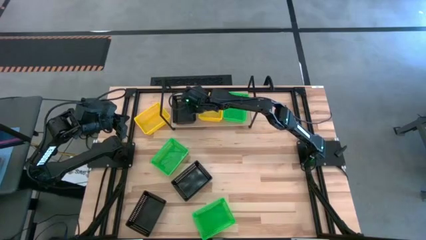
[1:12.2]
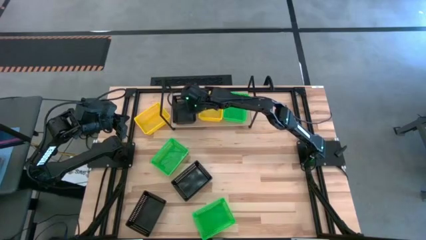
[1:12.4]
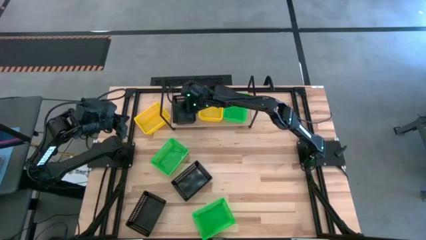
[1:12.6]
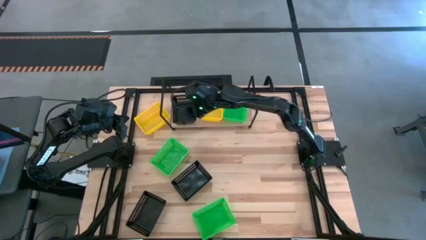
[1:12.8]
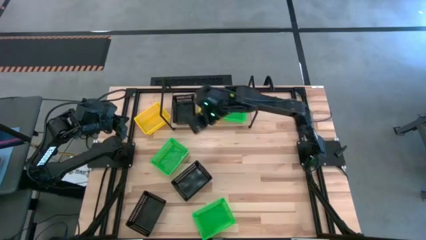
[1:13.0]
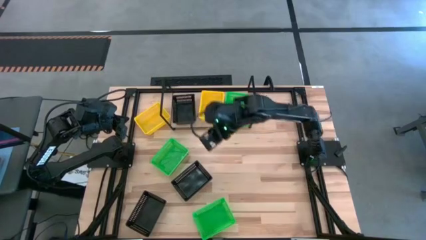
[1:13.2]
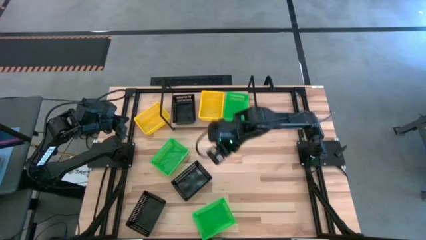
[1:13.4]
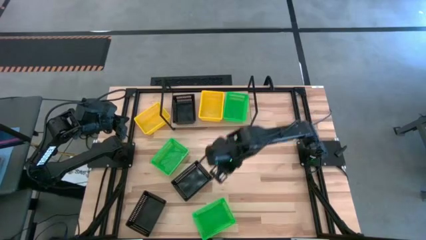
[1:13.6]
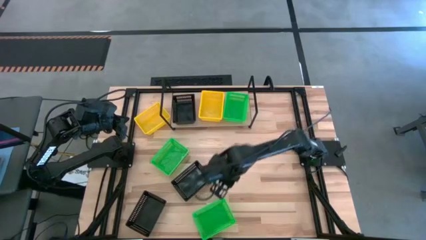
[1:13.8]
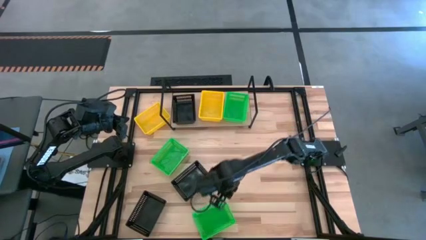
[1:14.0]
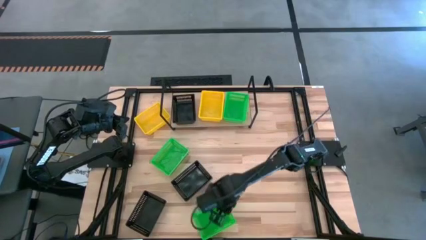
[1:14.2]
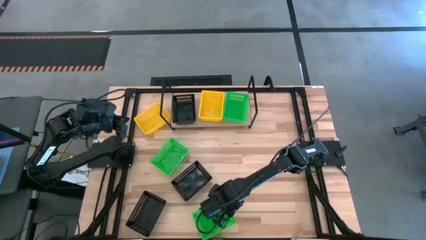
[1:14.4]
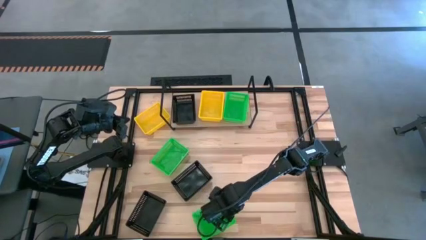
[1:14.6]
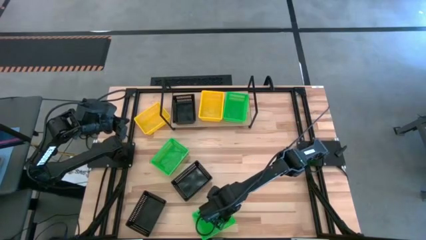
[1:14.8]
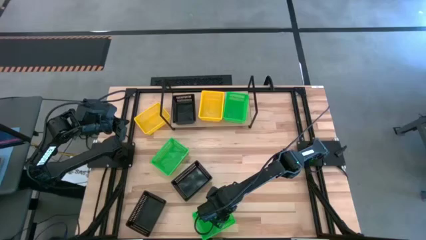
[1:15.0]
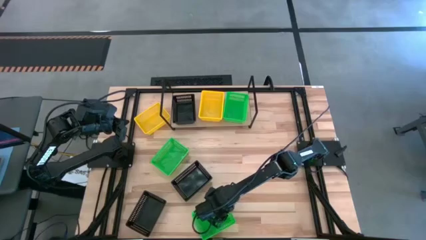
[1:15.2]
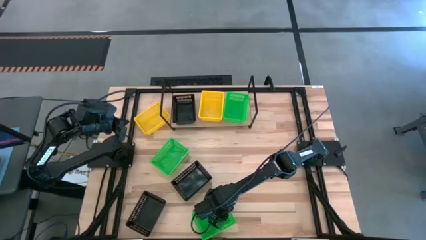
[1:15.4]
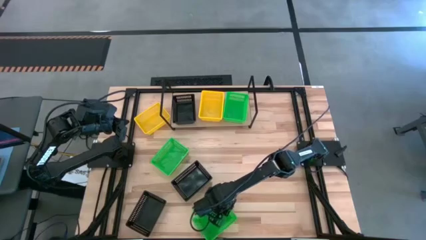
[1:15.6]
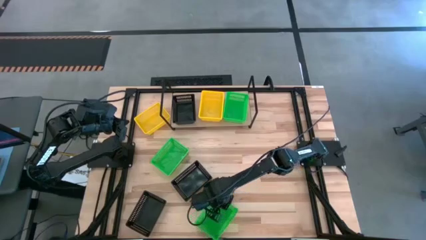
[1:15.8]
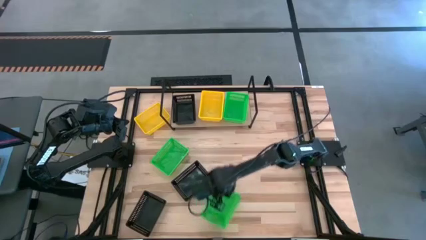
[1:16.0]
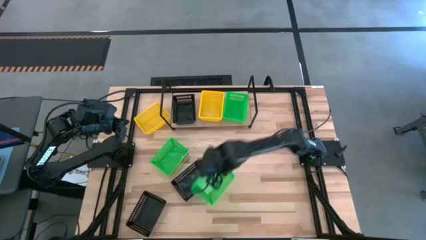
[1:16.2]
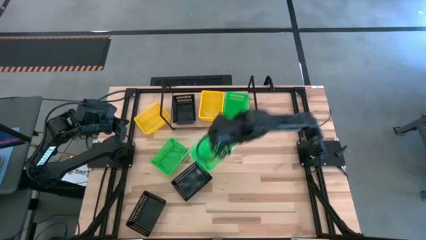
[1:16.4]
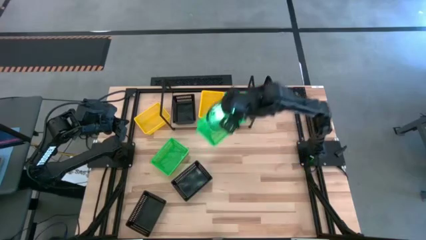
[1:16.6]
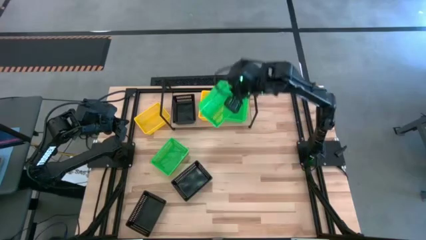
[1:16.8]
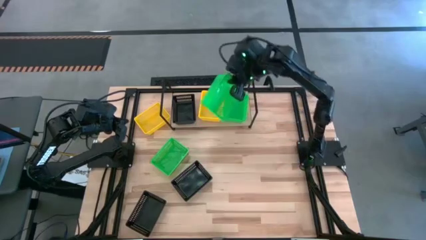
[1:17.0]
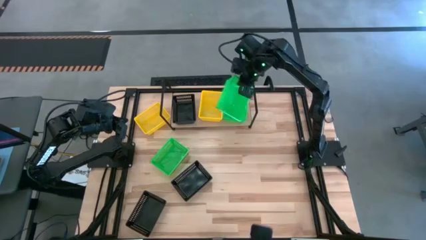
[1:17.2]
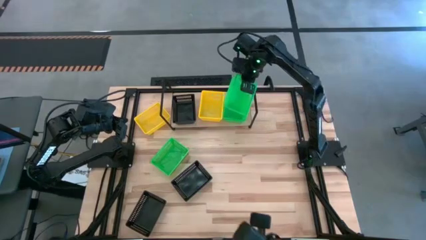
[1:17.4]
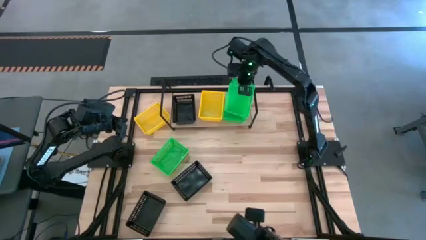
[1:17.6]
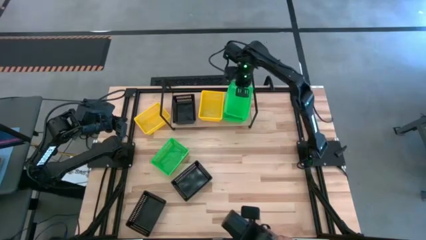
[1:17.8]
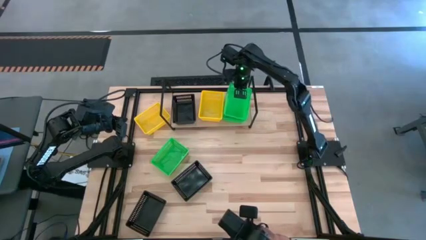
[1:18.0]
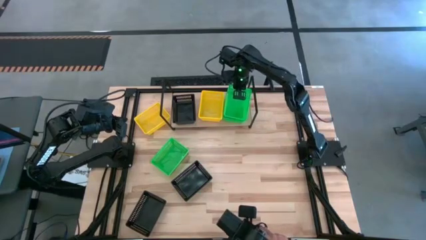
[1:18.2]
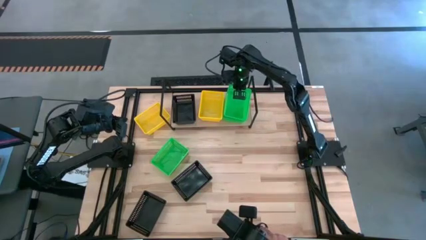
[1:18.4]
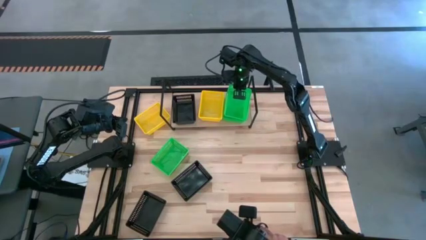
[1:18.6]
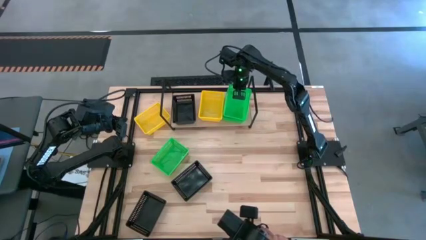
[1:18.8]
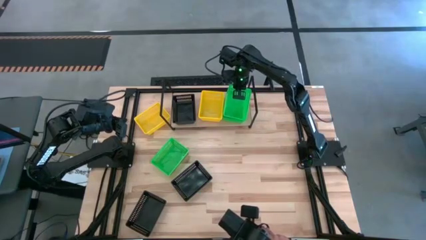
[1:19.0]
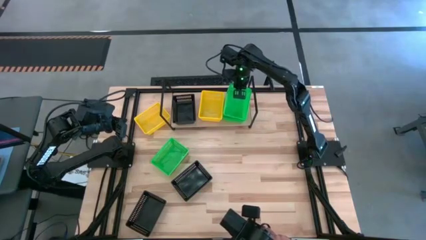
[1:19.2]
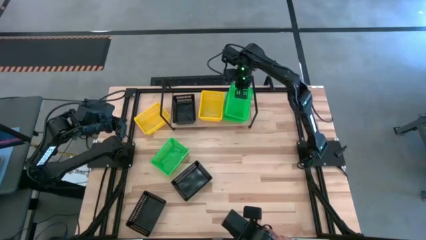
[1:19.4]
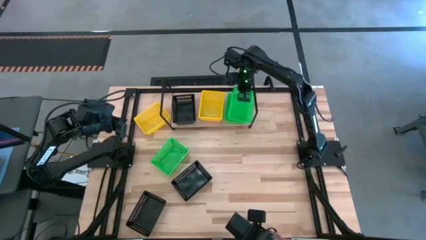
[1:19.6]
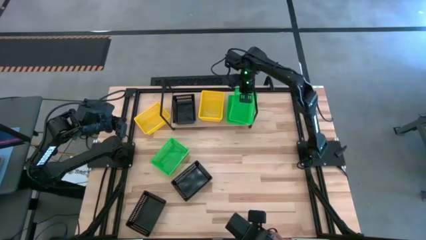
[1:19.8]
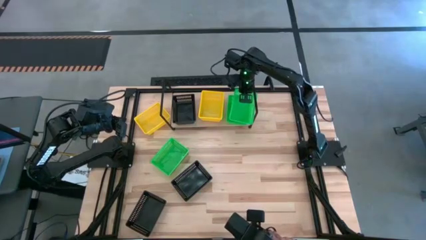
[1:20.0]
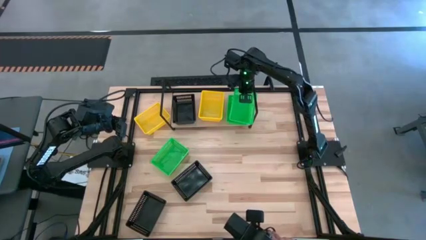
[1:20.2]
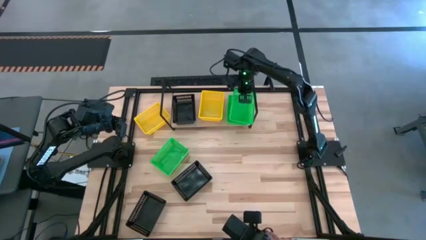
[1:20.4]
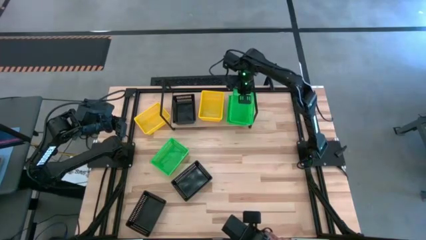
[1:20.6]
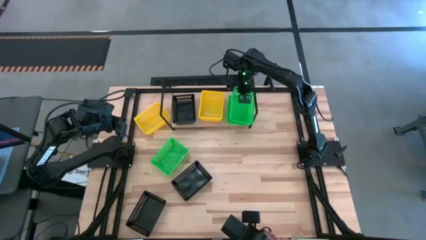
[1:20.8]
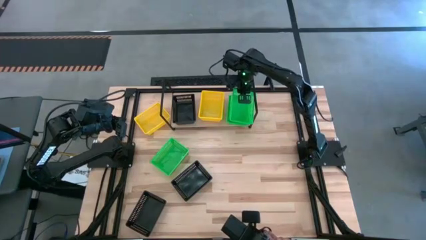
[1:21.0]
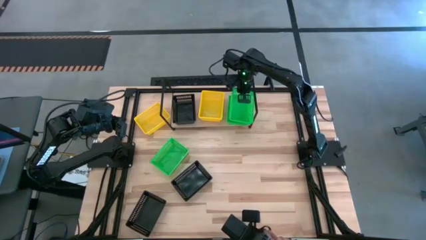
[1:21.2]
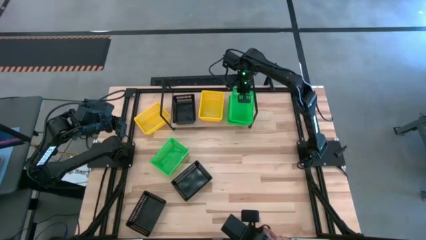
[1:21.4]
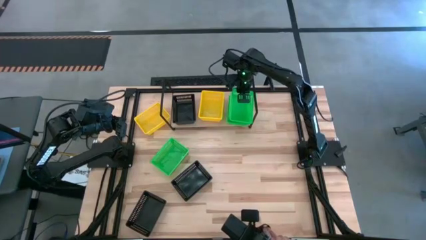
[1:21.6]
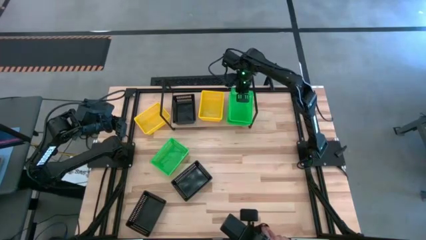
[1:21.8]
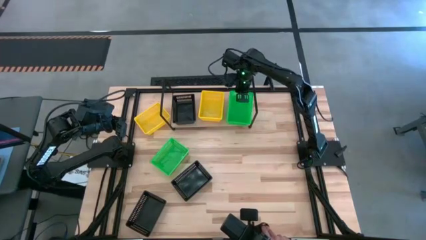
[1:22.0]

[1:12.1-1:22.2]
Task: Stack baskets on shelf by color
Stack the bottom green bin on top of the green bin on the shelf

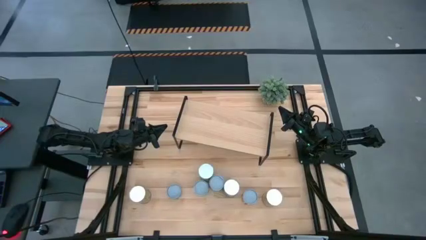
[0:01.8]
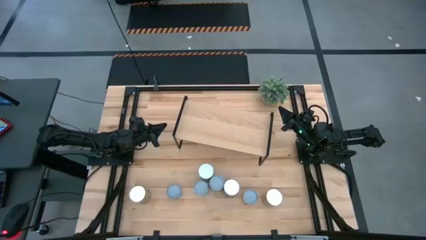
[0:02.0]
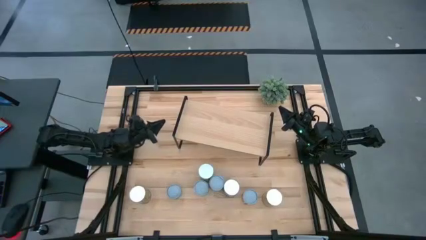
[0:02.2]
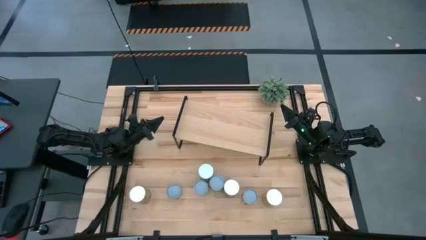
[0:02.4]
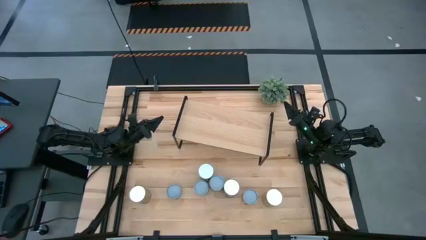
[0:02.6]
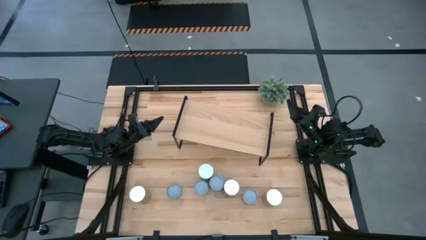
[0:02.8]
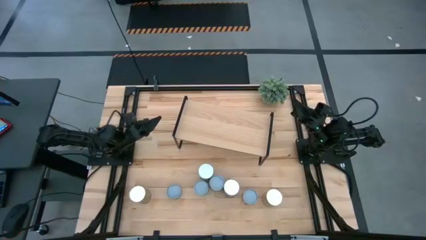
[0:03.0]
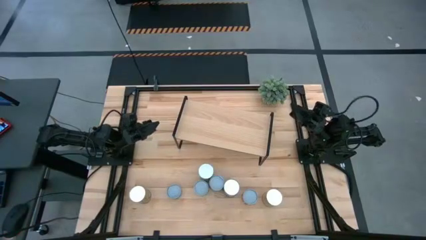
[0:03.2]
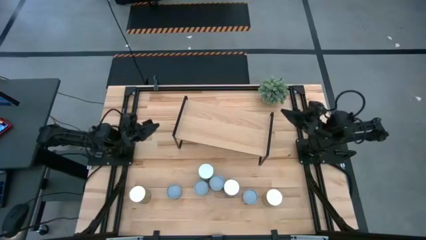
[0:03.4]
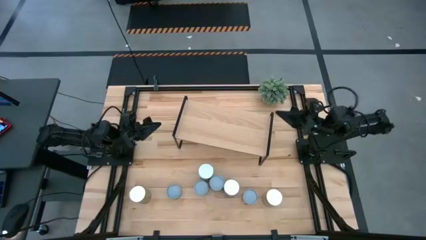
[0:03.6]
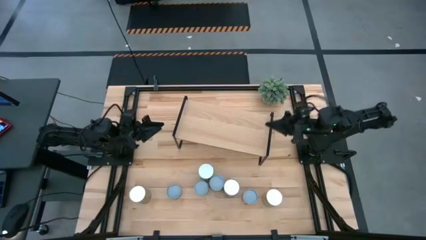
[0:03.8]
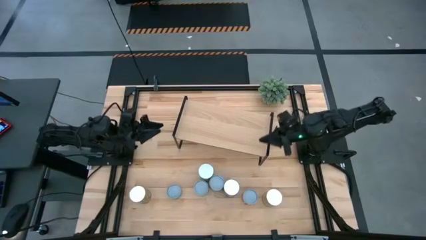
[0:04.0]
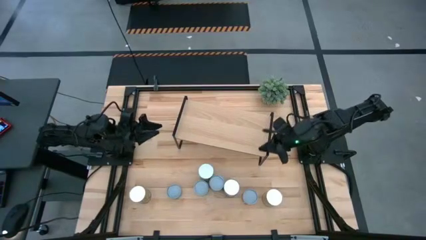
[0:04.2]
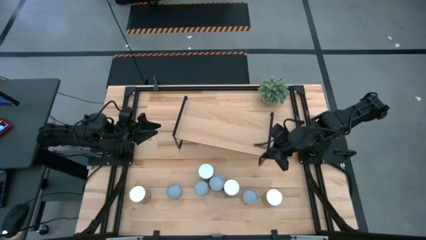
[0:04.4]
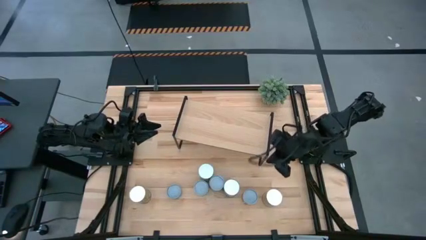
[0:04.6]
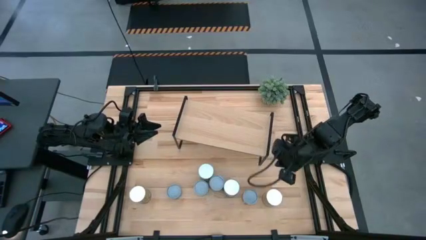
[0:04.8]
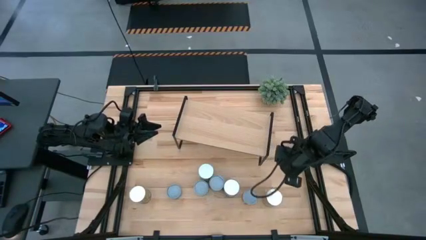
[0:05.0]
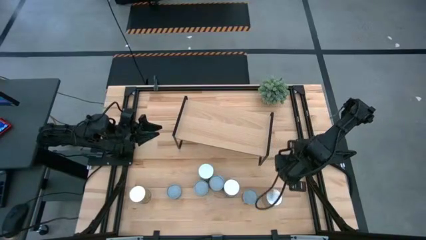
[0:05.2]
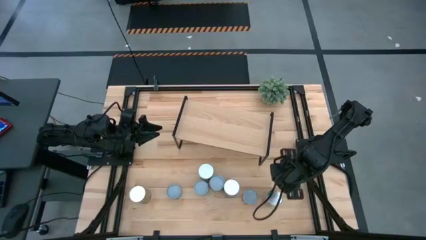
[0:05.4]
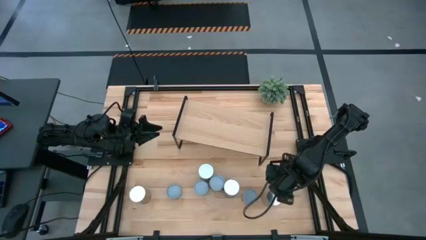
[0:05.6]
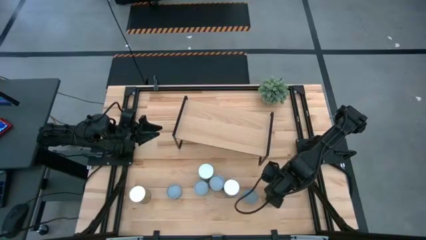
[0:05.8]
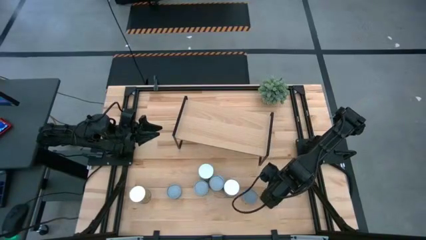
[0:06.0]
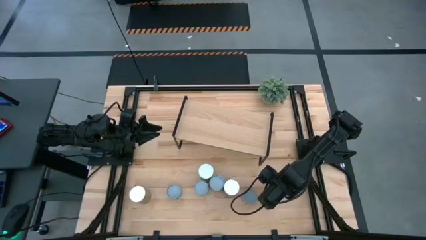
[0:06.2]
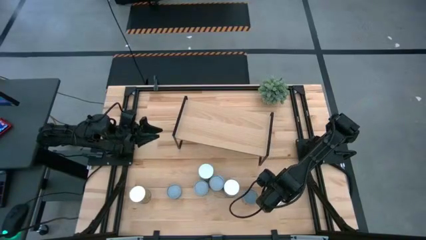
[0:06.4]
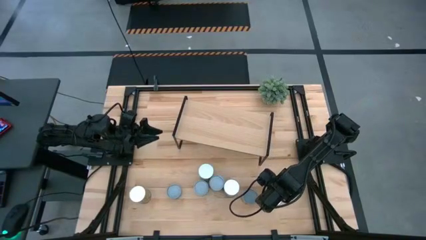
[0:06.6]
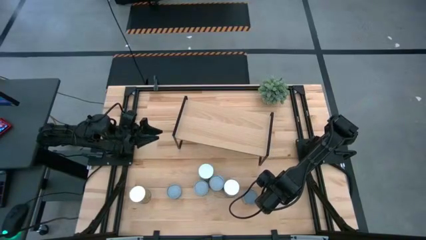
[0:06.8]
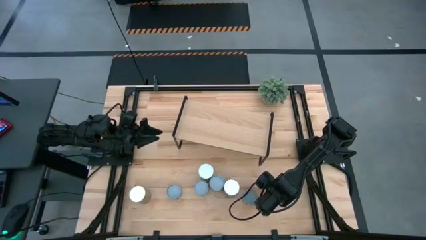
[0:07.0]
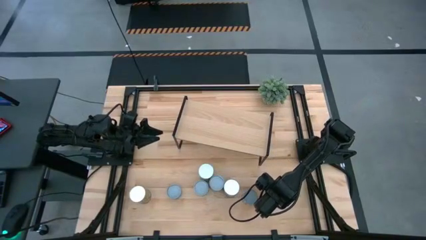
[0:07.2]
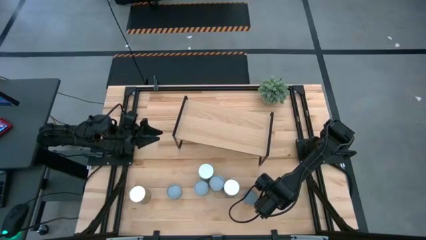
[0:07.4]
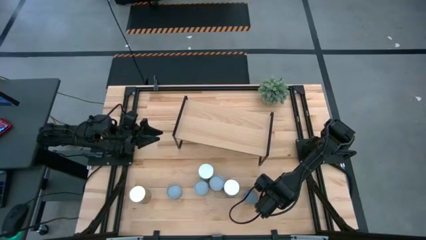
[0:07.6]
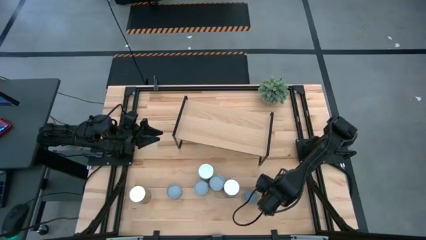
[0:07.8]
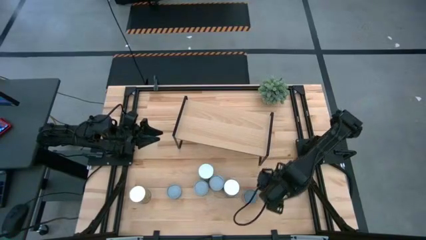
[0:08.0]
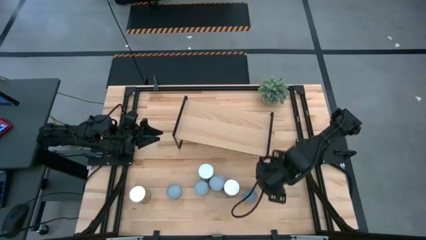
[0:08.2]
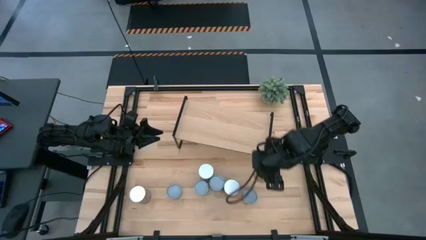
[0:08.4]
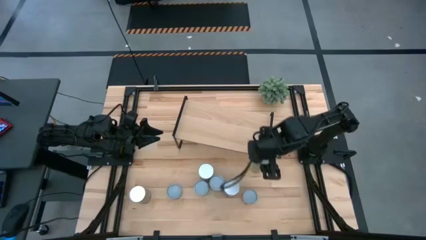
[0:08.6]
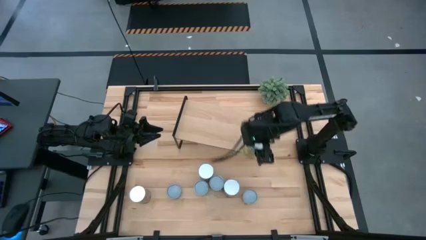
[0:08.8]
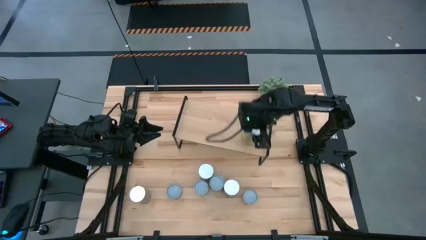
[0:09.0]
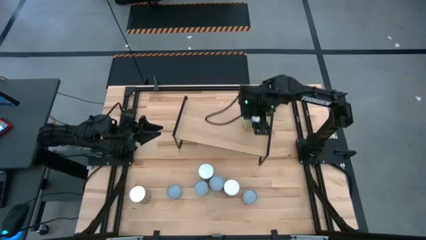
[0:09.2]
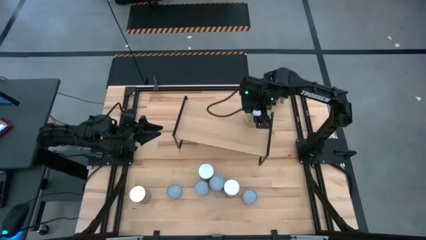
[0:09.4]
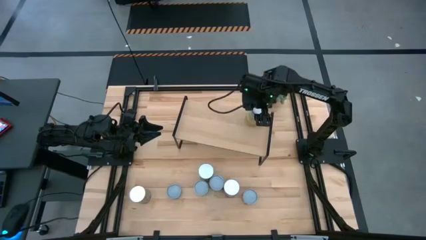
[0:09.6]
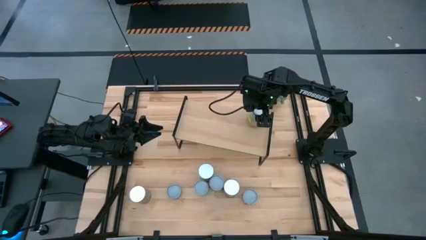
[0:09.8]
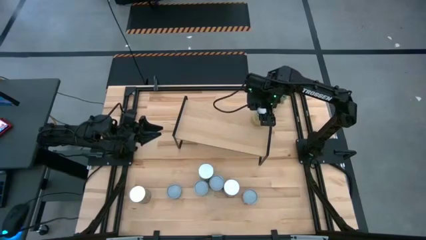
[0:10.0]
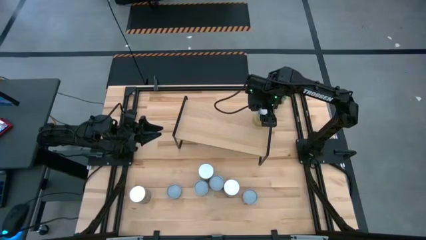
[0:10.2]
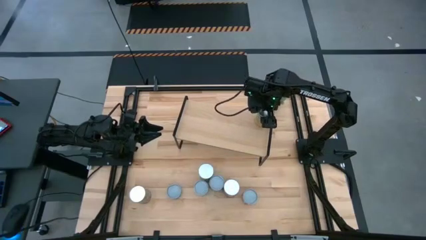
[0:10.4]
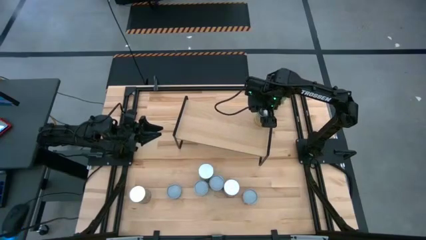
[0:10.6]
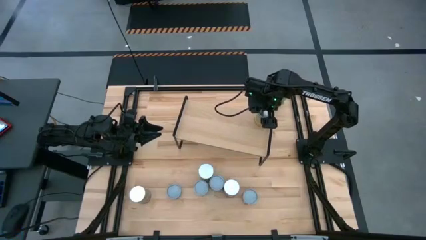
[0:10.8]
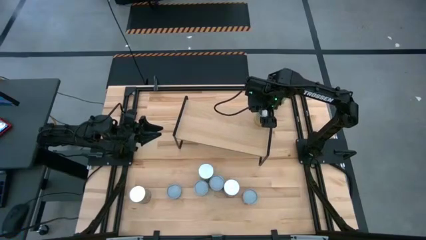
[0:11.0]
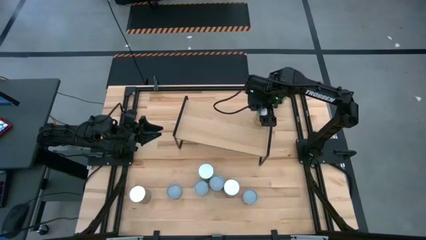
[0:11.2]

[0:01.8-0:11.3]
Task: Pick and place cans onto a shelf
Put the canned carrots on the shelf
